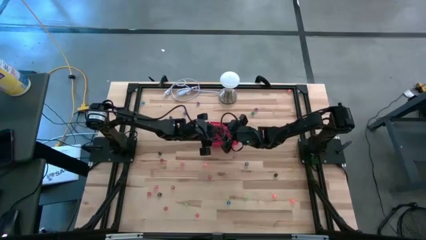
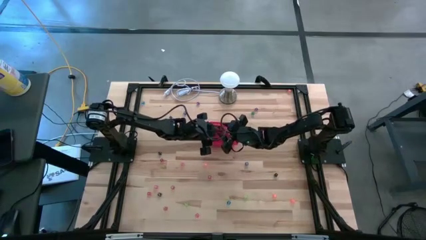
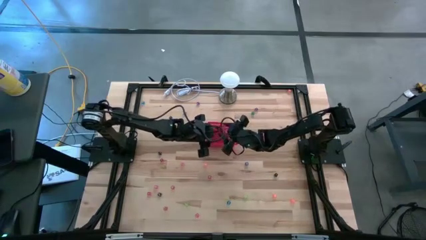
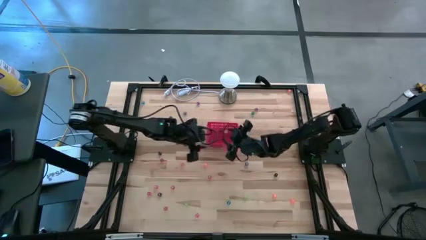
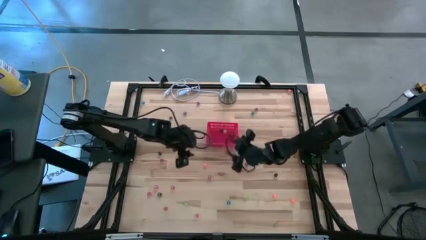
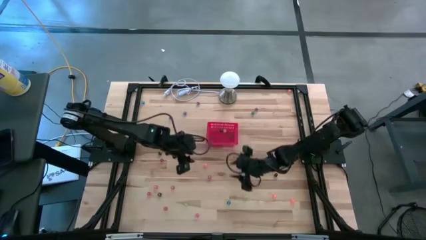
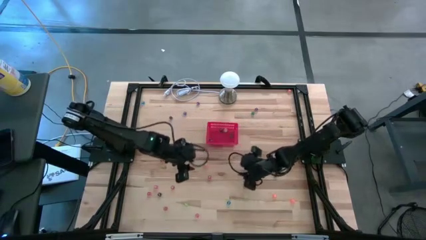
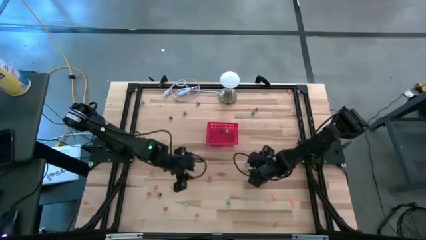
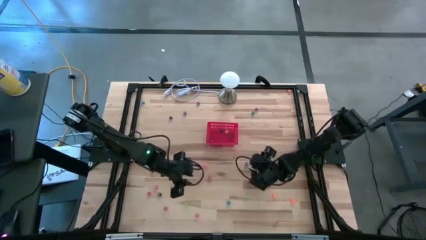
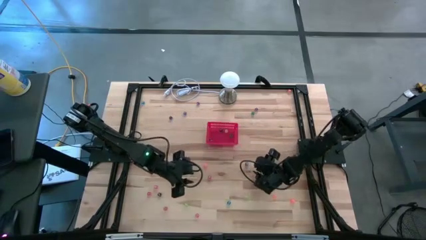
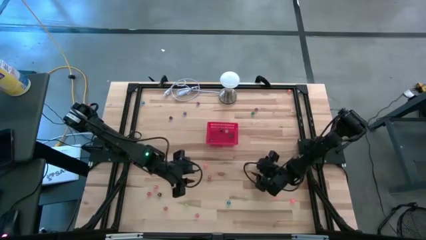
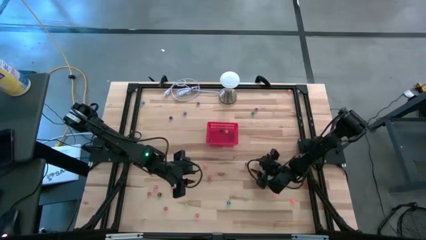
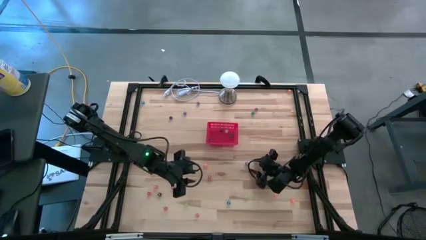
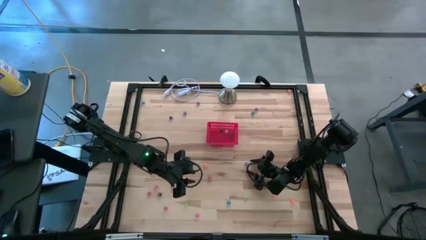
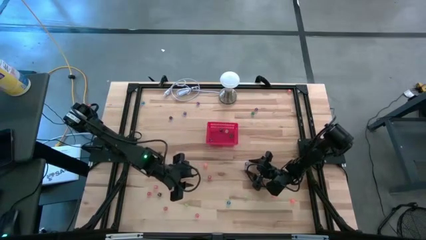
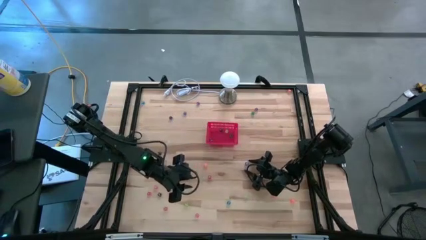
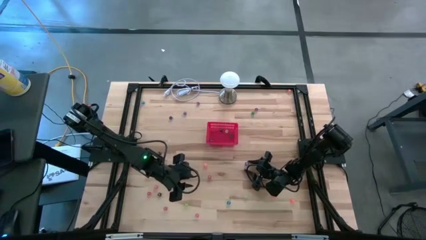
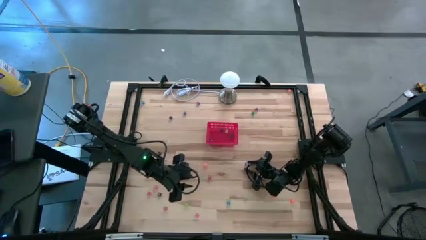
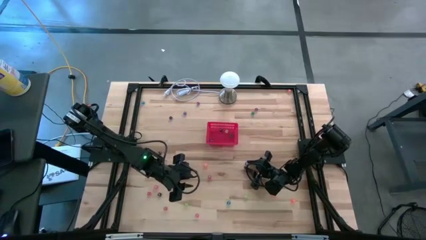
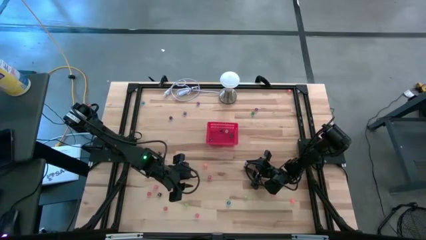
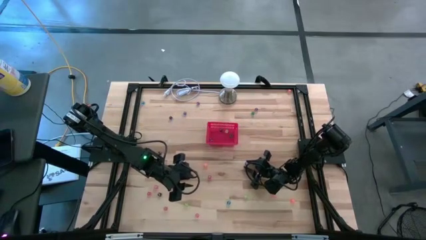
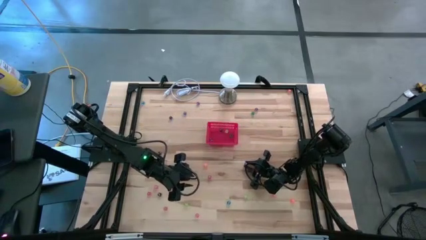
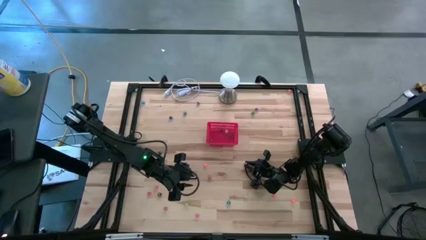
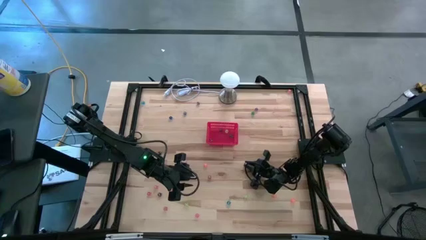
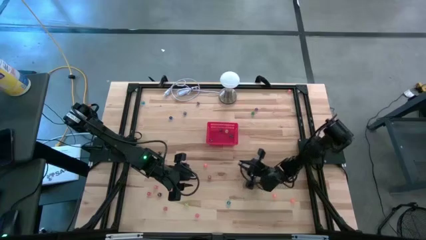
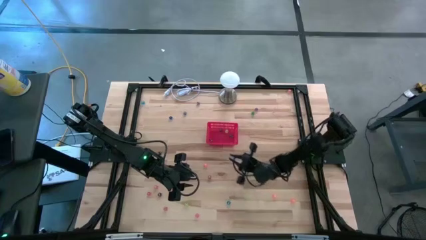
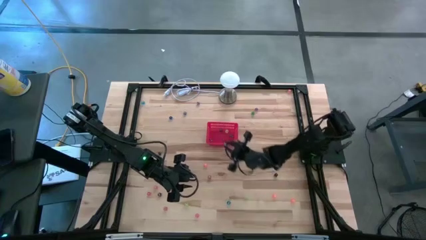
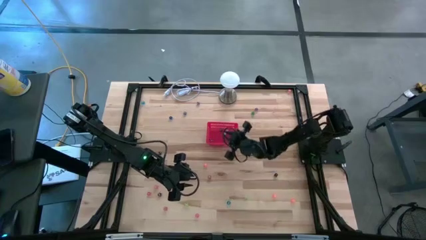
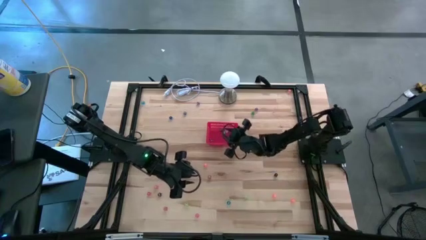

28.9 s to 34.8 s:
Task: Pick & Place Dice
Put the right blue dice into the bin

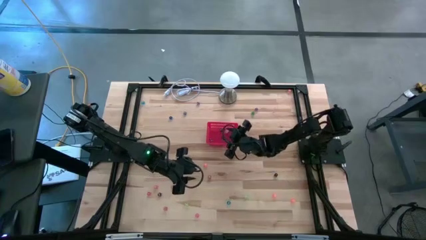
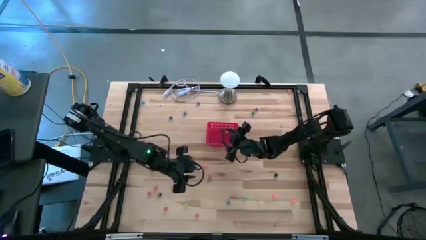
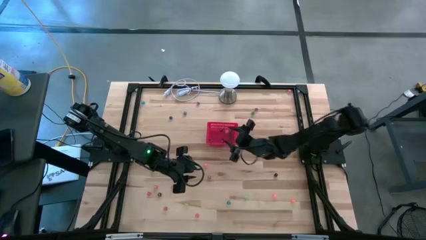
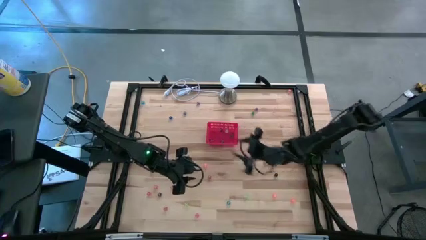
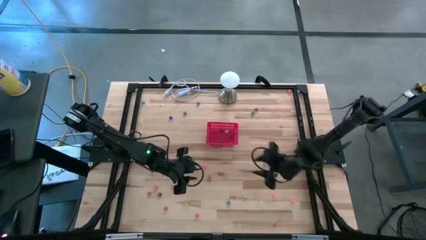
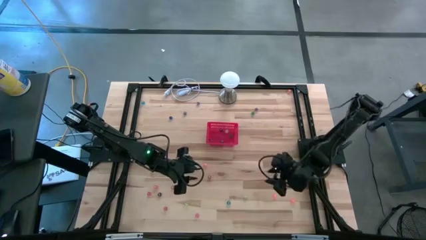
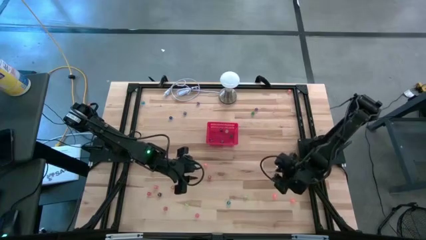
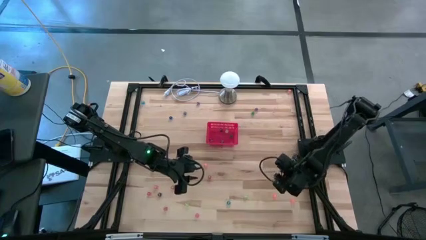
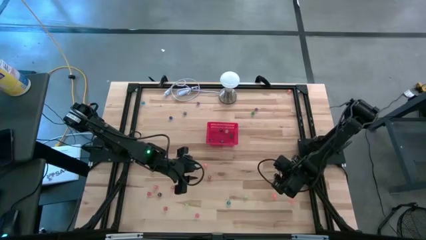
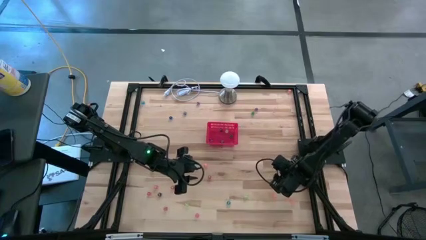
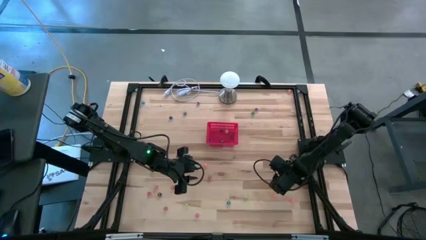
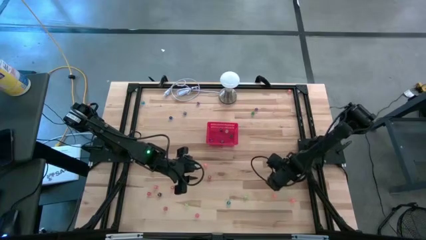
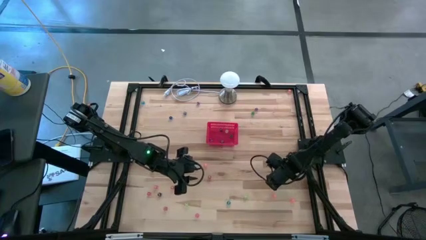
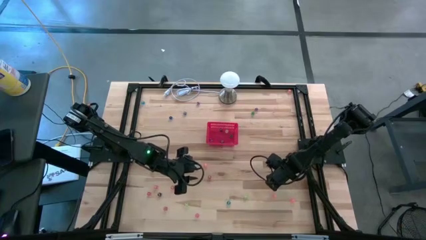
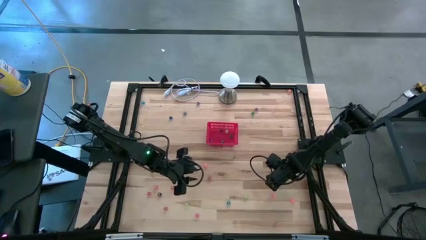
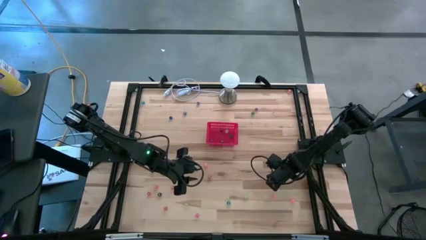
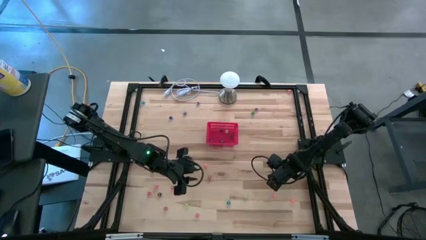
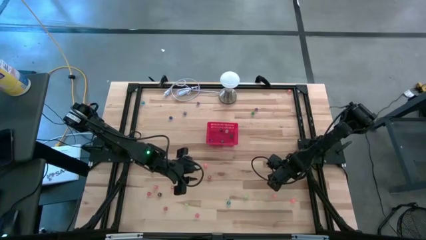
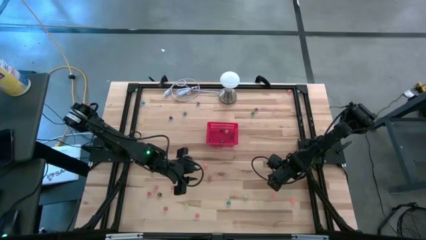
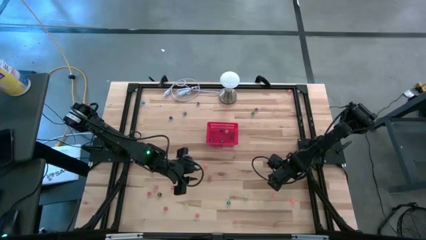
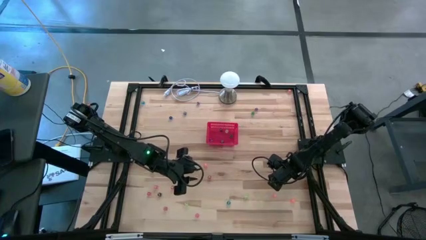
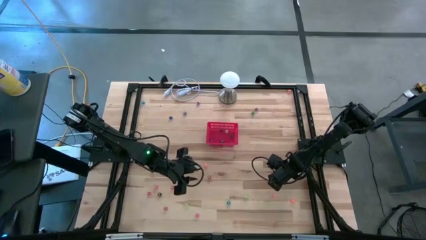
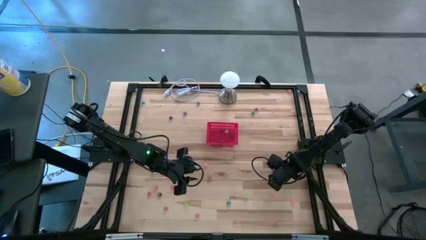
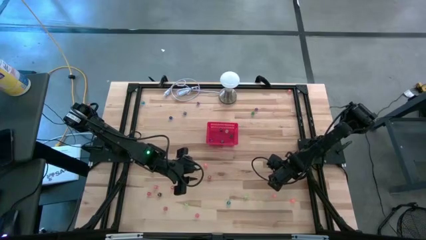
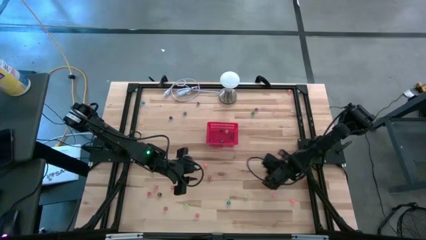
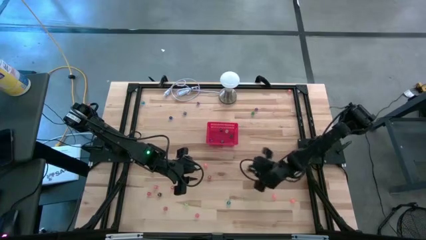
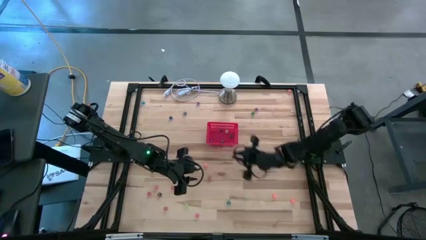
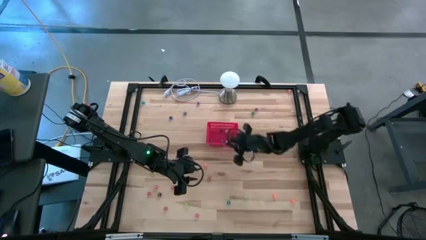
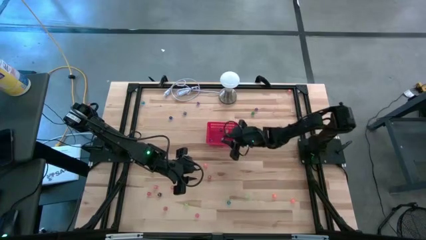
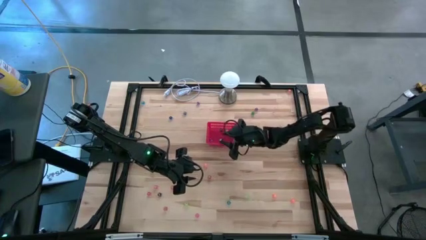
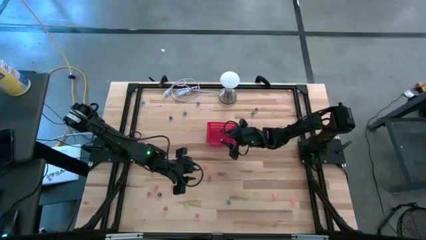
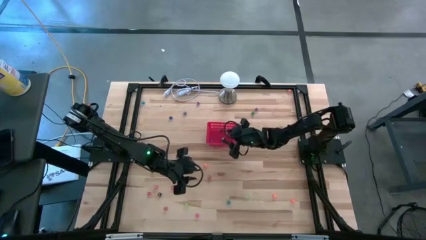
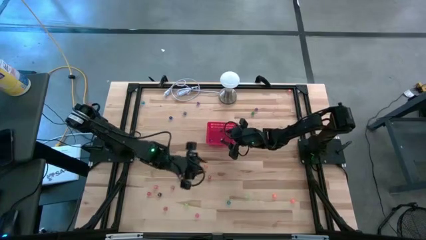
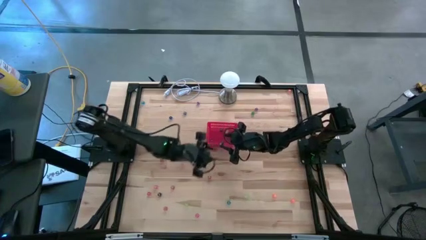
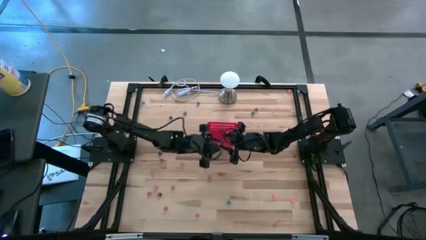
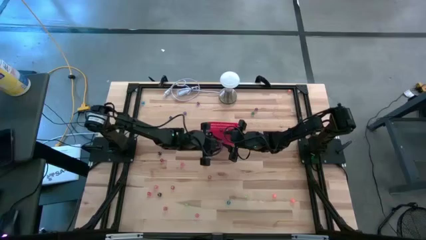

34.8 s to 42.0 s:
Put the right black dice into the bin

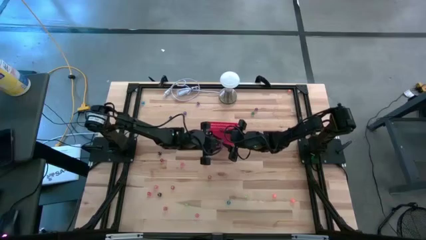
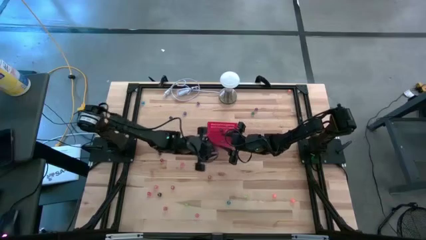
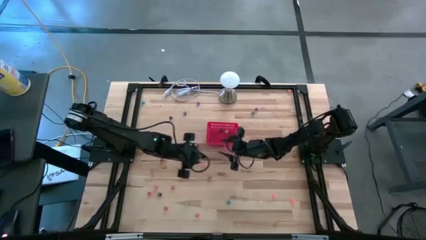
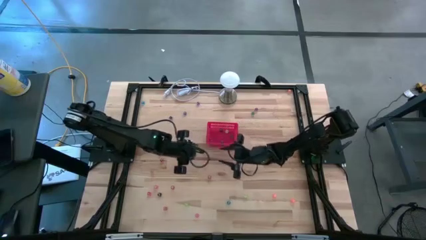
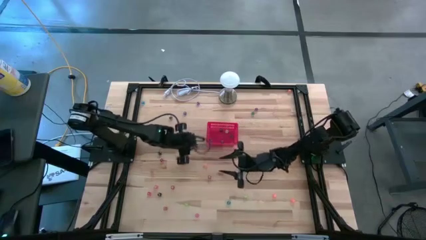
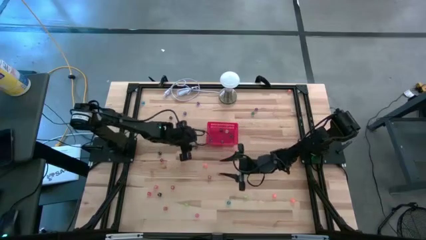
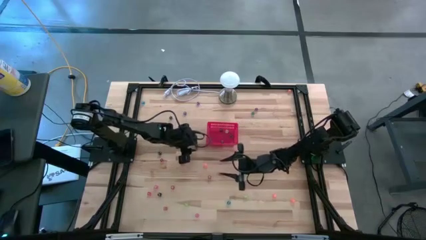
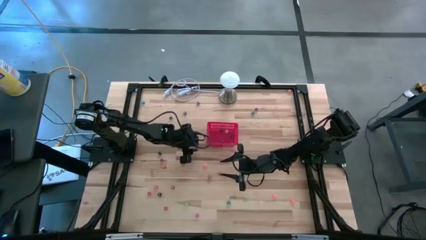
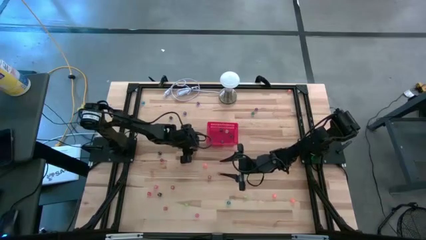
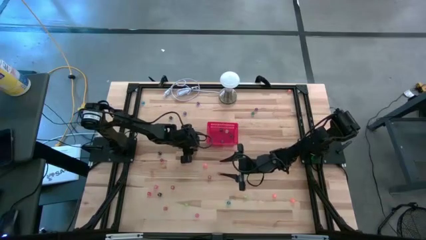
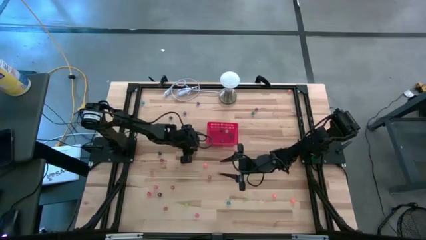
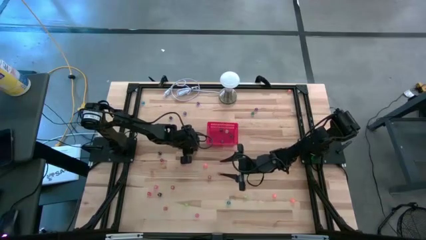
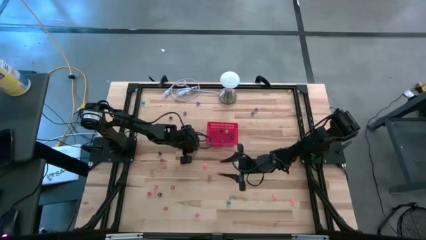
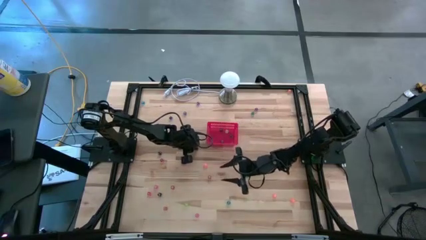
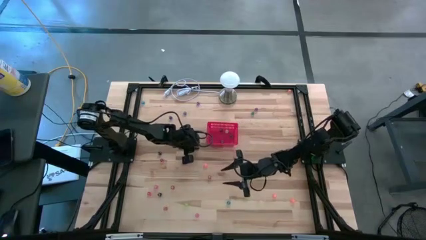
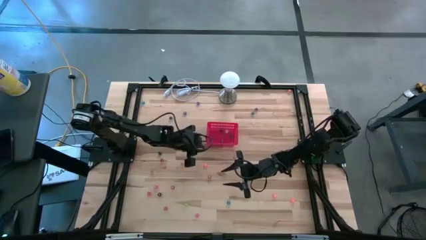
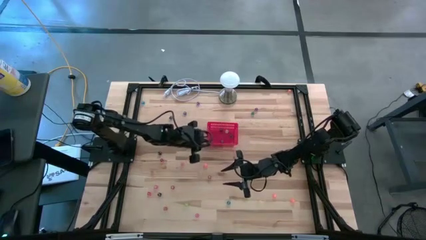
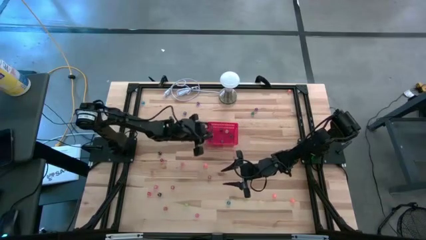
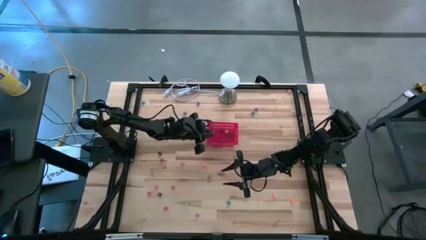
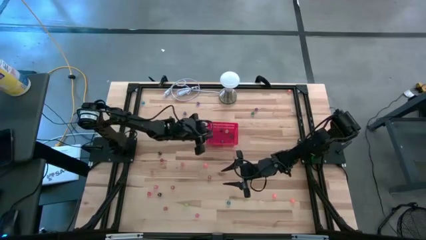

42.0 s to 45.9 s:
Put the top right black dice into the bin

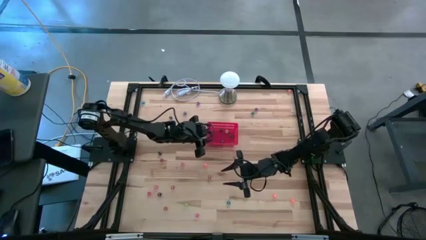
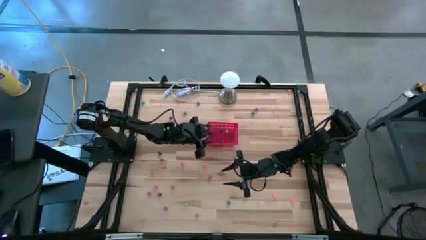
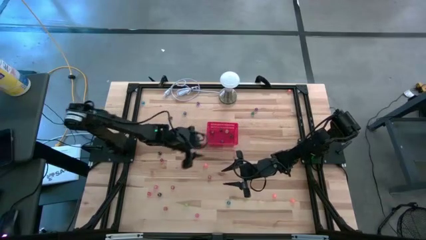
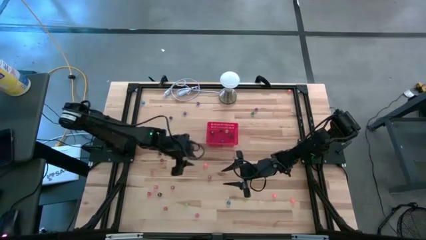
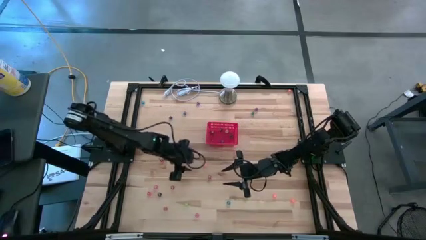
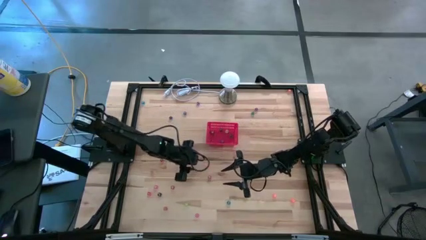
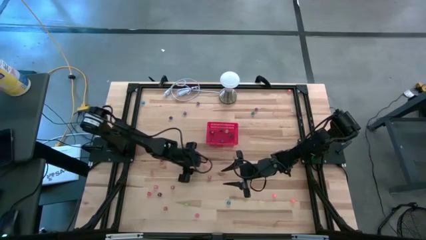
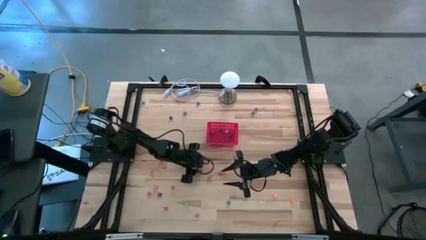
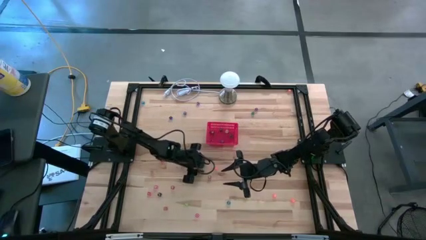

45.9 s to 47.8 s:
Put the orange dice into the bin
